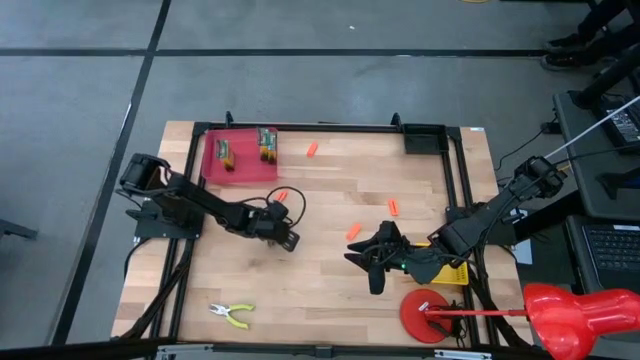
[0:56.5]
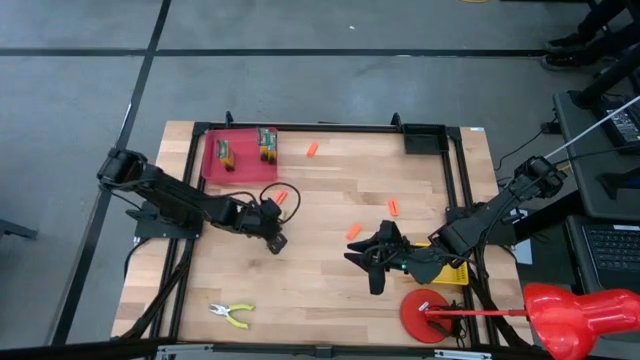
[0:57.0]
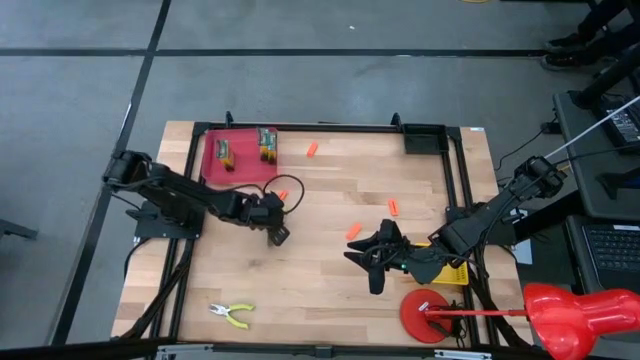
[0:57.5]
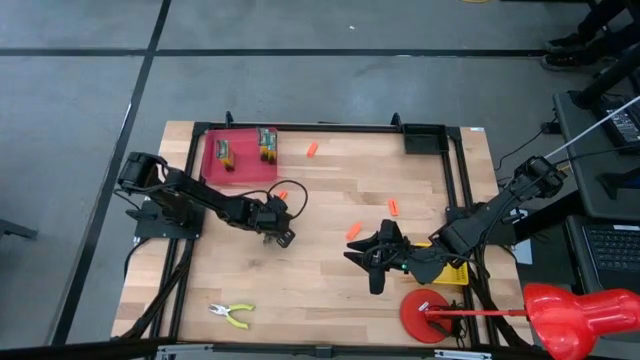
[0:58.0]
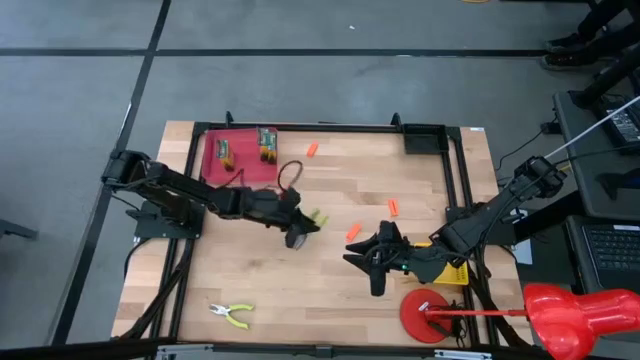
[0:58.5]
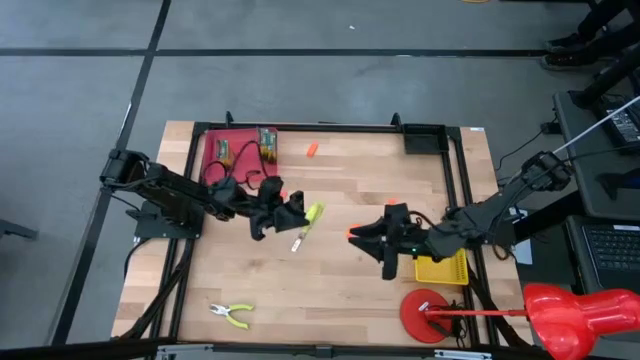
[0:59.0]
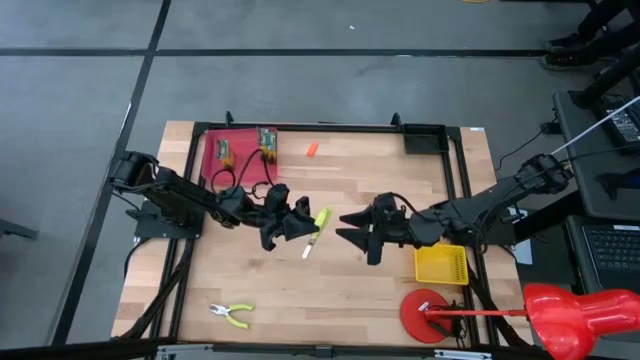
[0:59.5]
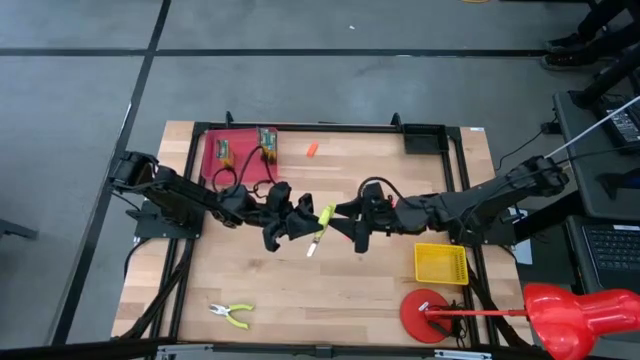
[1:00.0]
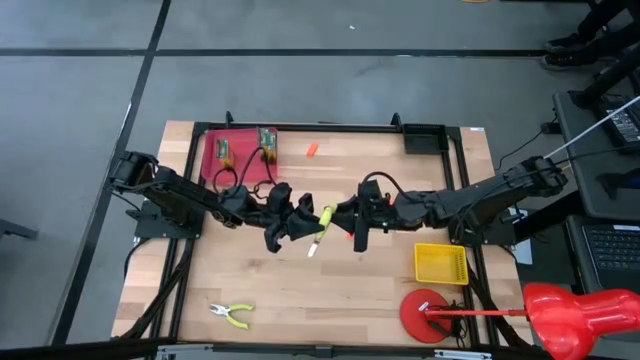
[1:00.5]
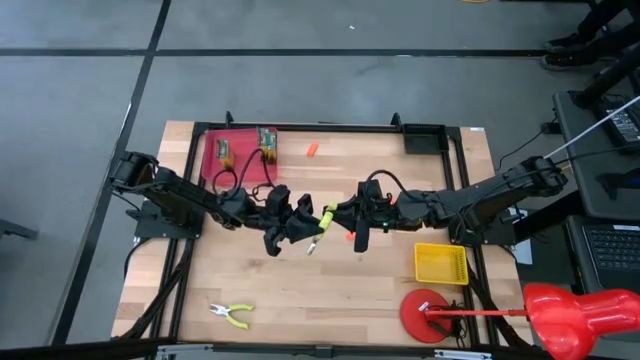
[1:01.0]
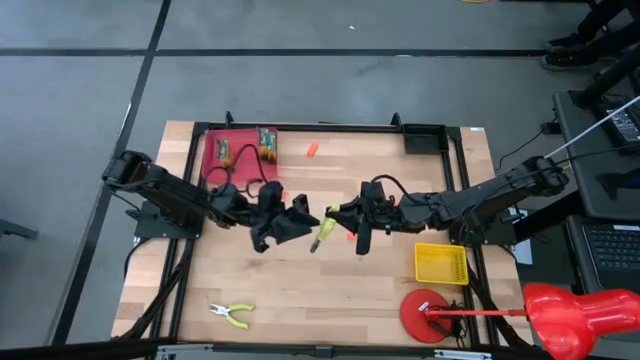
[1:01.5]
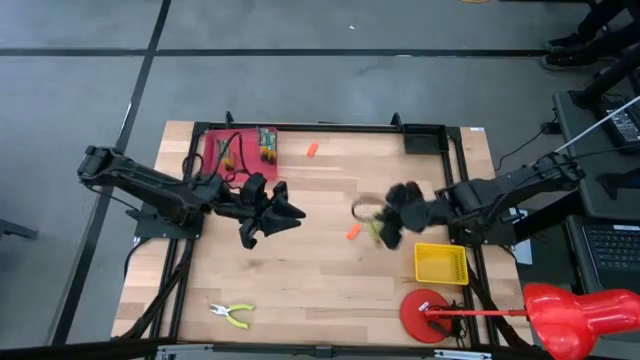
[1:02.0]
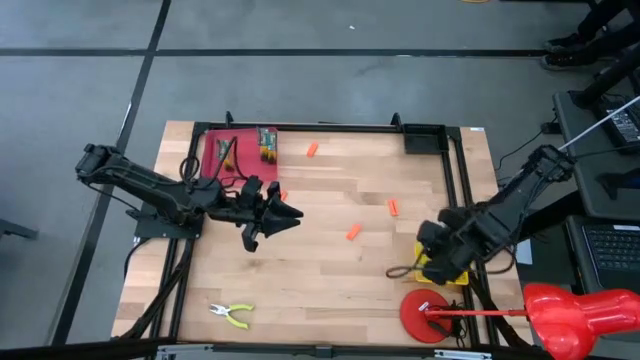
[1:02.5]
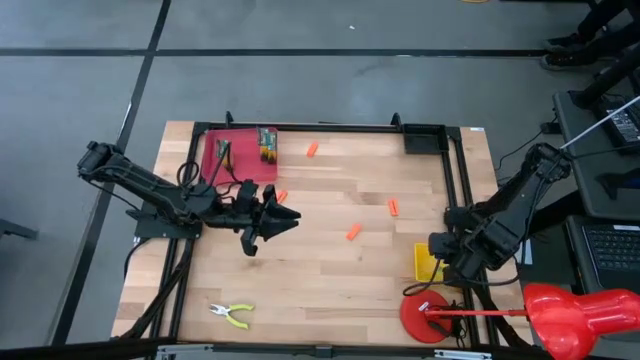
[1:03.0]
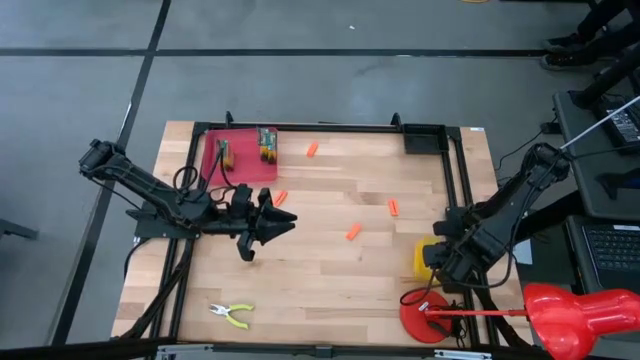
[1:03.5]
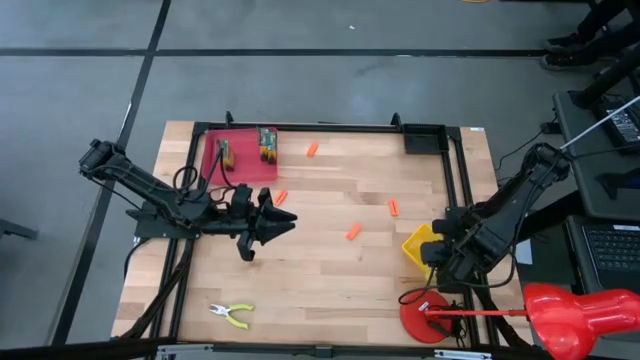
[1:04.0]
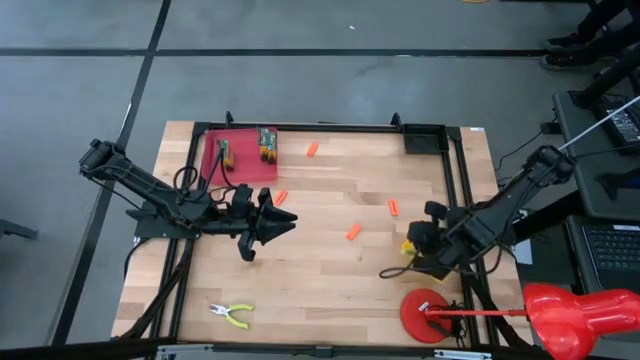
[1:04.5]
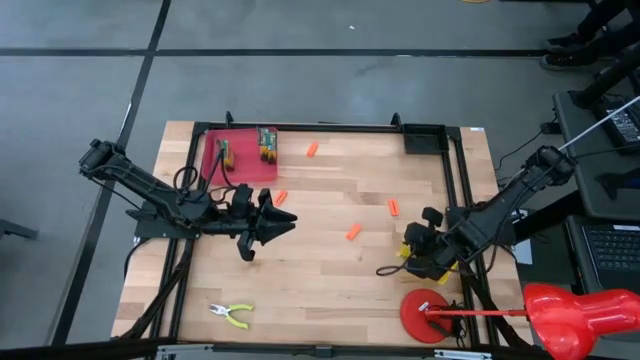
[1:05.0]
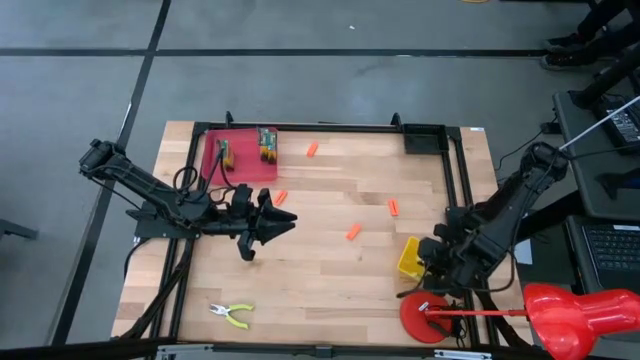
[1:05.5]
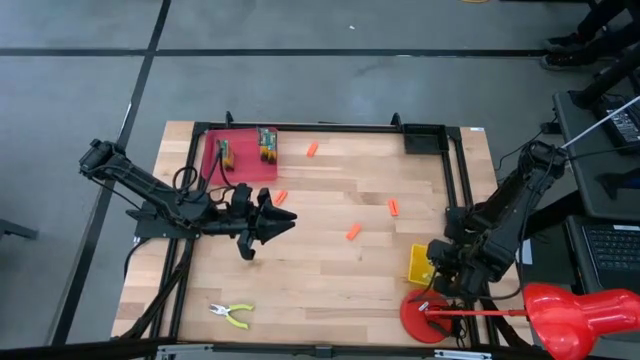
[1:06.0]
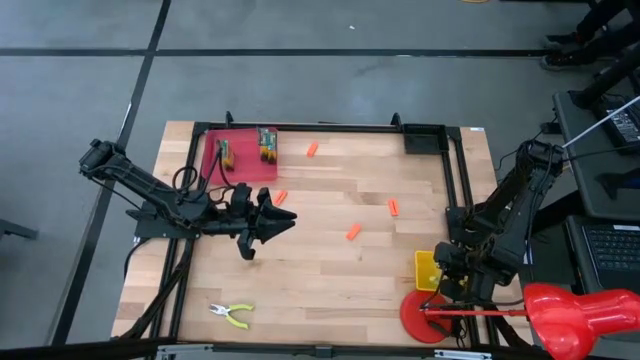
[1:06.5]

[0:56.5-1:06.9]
Task: Pick & Place School Supplies
Put the green hole puncher into the yellow bin

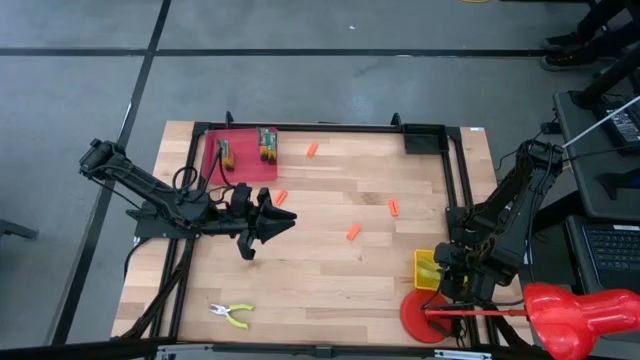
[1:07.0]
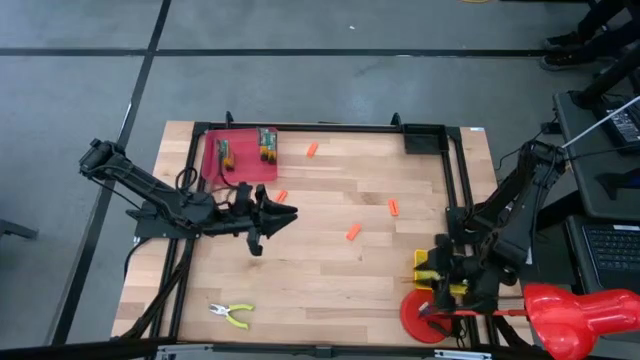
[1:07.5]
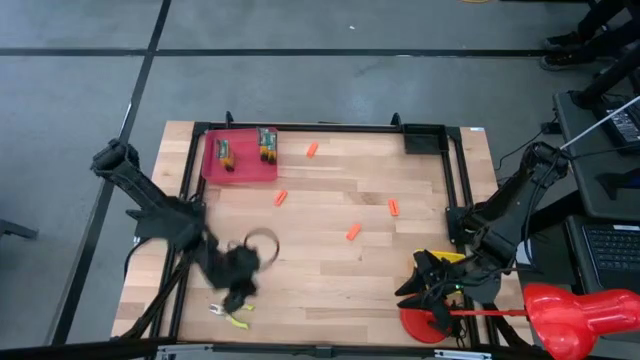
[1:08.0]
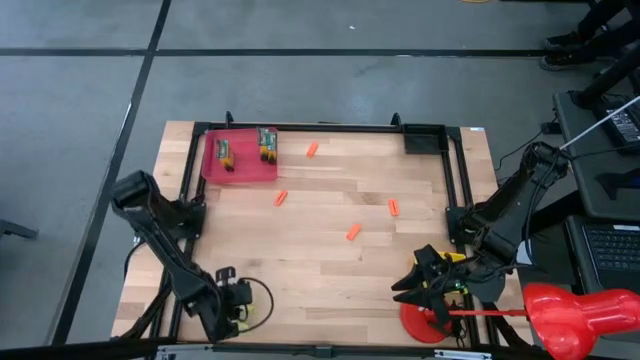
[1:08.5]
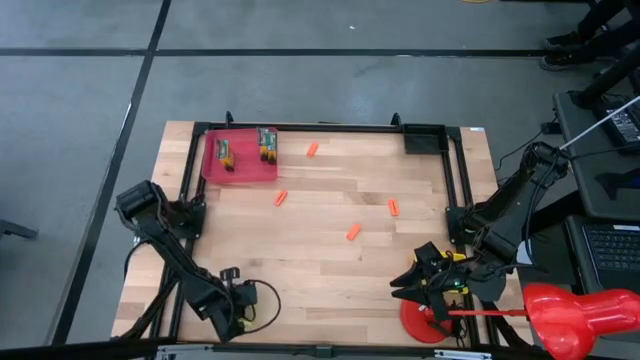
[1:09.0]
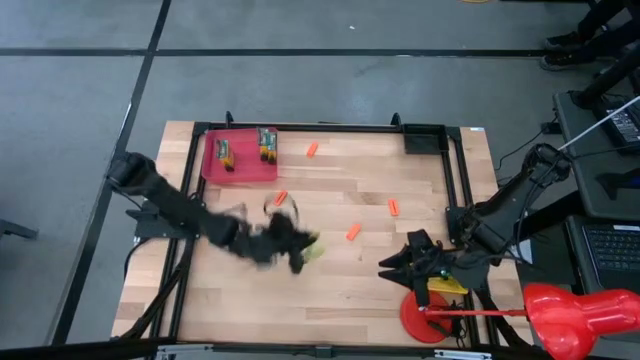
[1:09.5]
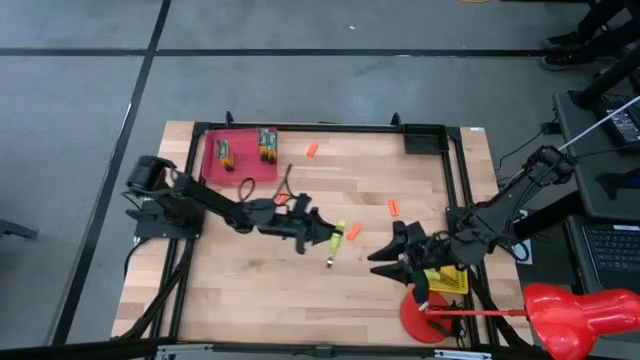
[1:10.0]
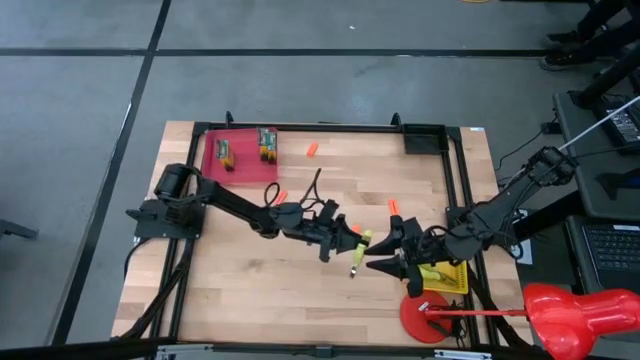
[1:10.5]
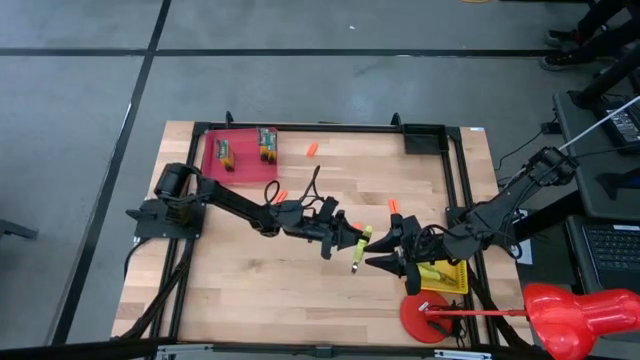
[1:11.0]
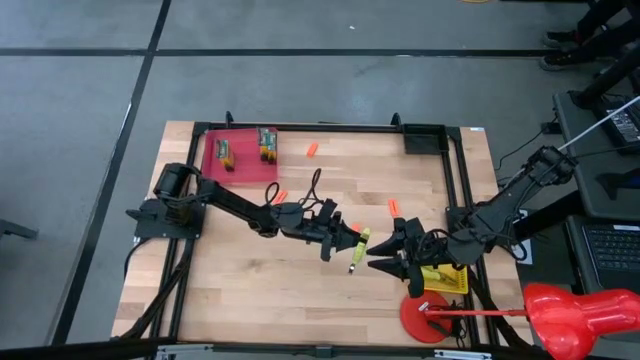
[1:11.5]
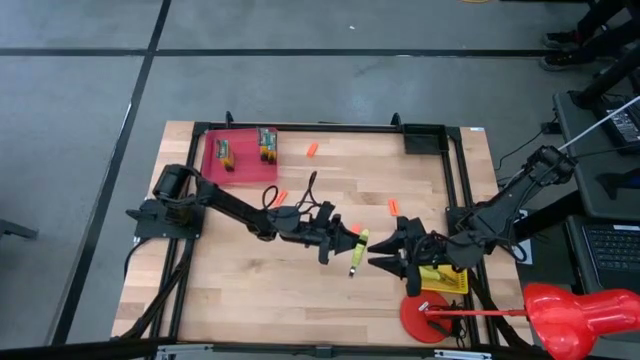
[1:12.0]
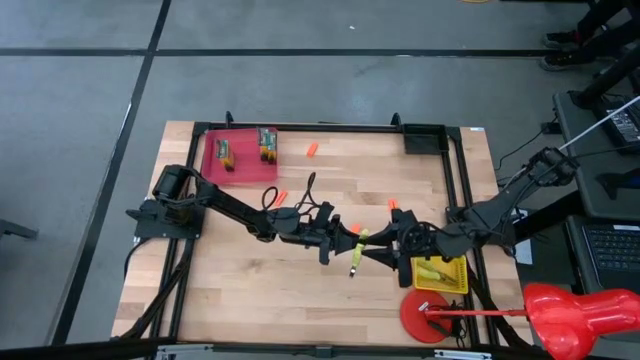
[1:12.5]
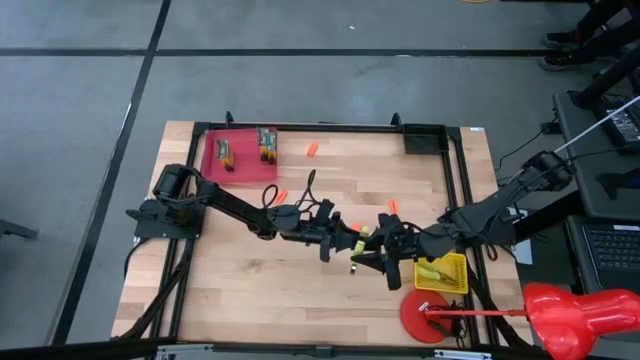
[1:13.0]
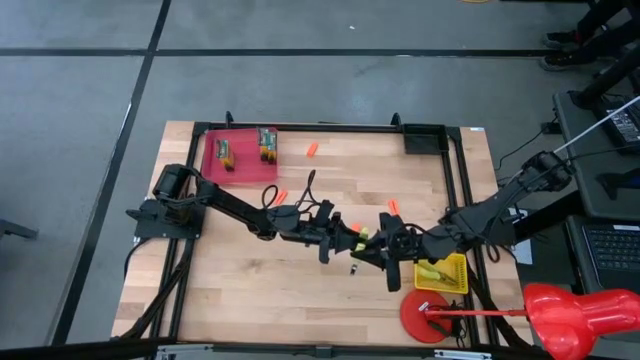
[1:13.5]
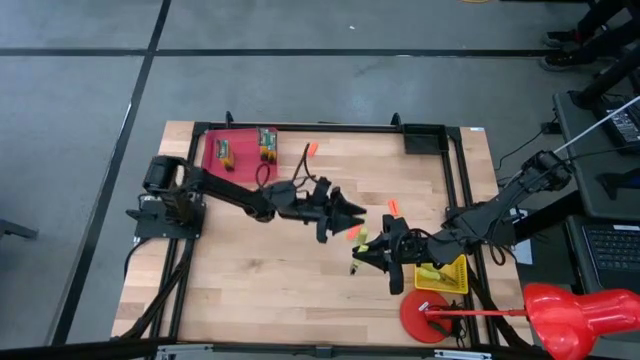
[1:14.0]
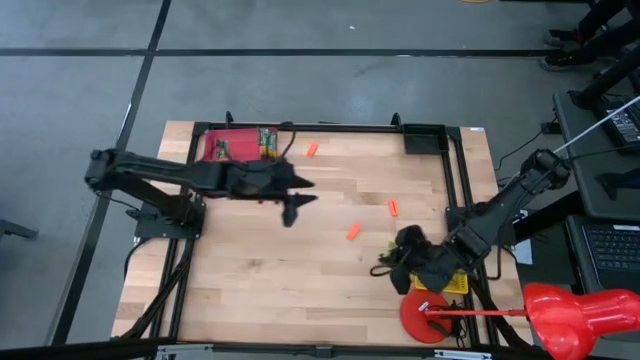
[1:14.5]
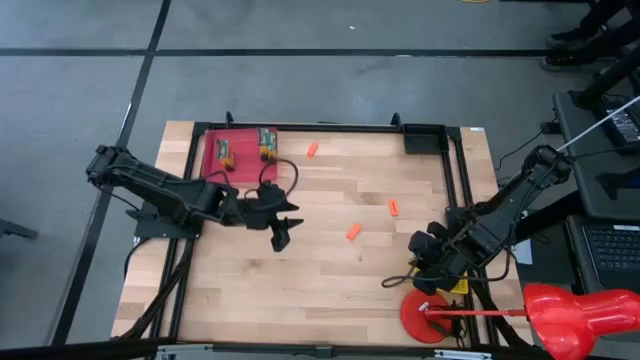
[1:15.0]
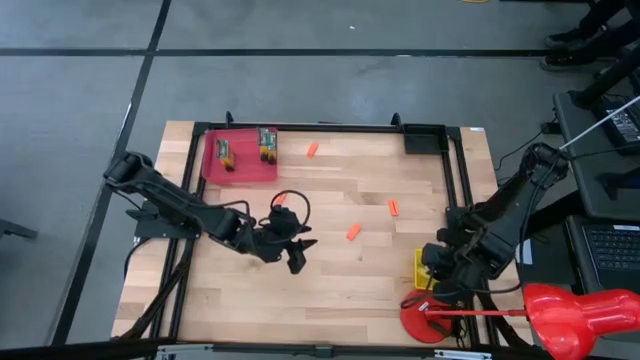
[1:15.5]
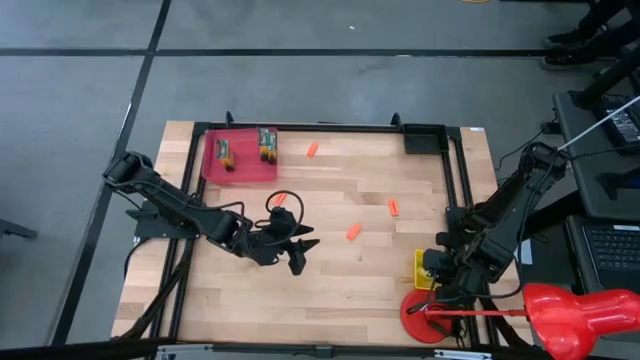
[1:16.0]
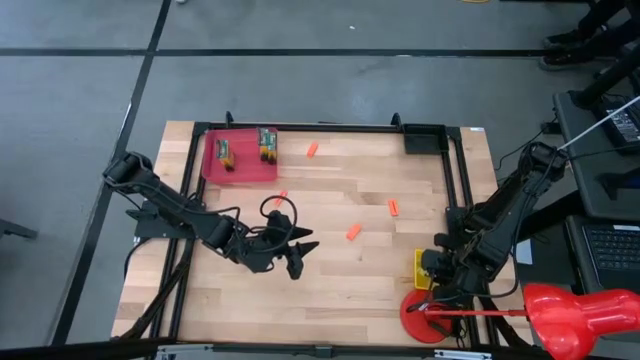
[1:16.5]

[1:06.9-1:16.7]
Put the green hole puncher into the yellow bin
